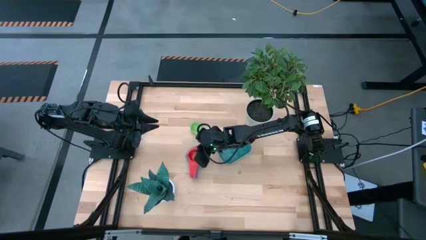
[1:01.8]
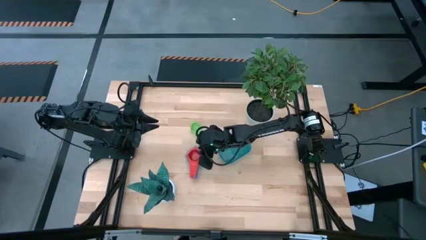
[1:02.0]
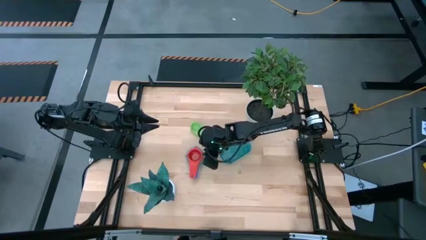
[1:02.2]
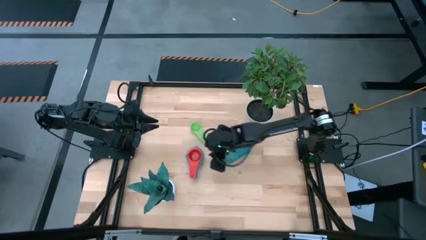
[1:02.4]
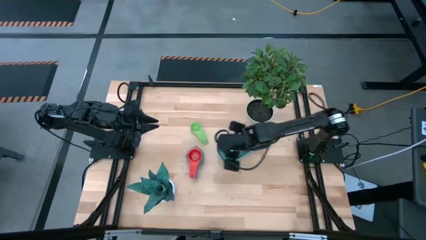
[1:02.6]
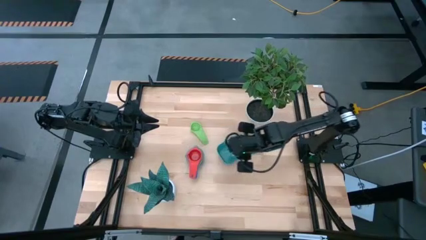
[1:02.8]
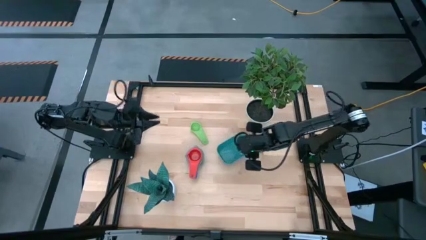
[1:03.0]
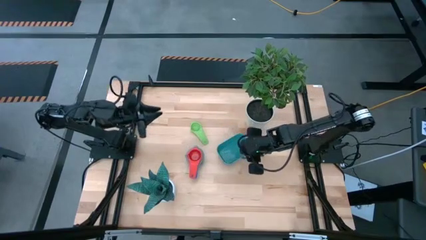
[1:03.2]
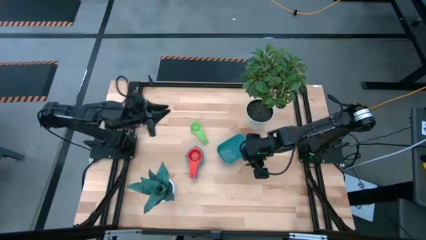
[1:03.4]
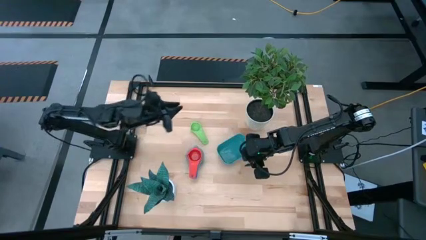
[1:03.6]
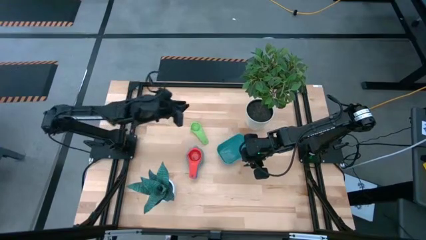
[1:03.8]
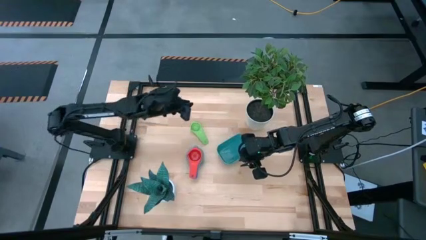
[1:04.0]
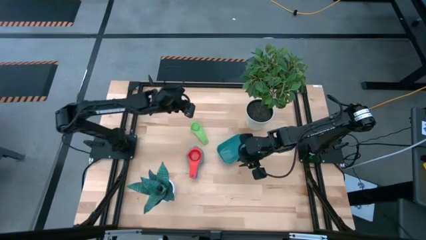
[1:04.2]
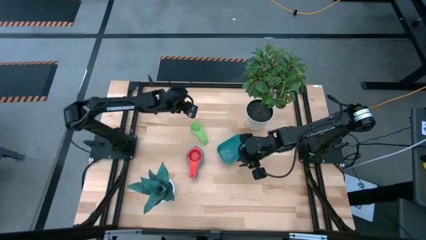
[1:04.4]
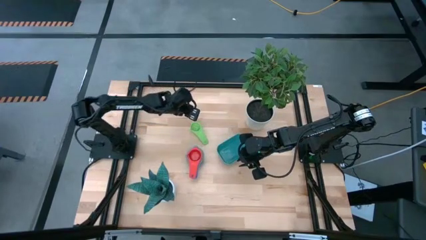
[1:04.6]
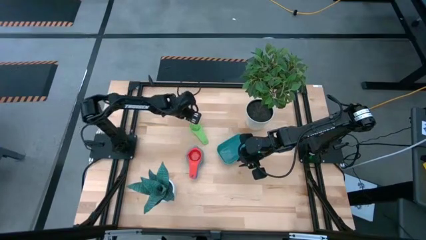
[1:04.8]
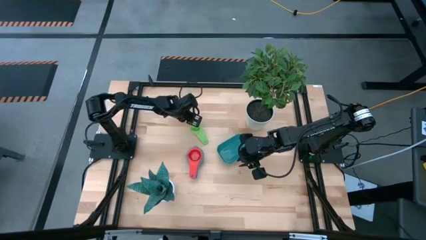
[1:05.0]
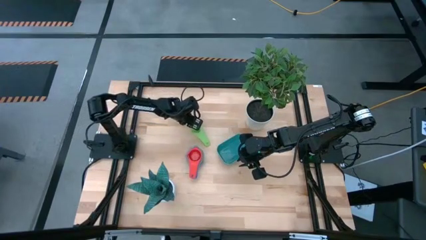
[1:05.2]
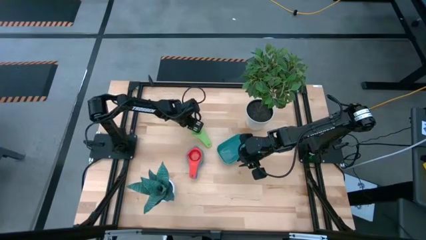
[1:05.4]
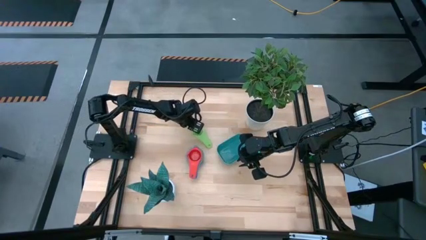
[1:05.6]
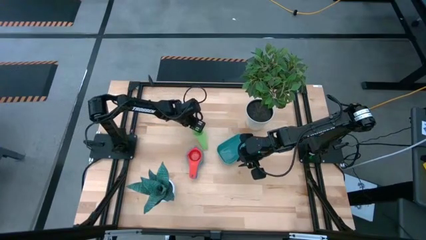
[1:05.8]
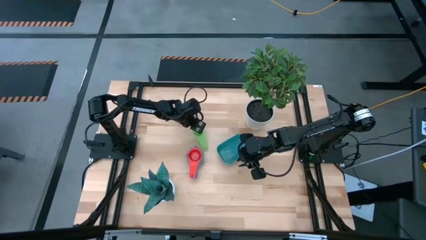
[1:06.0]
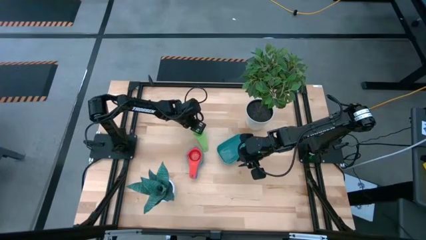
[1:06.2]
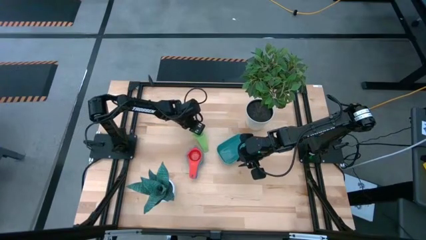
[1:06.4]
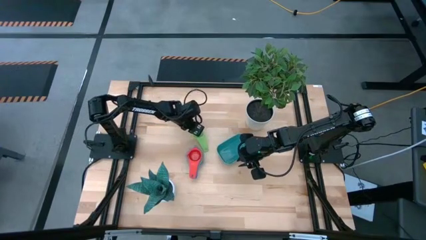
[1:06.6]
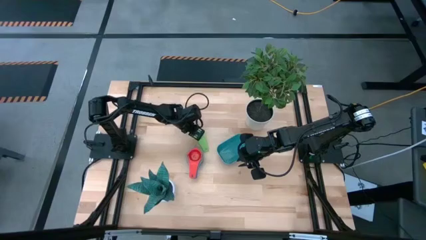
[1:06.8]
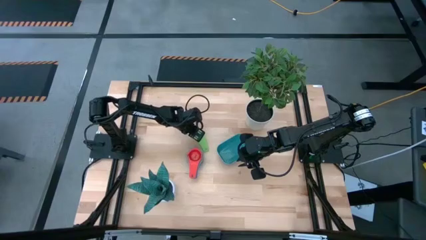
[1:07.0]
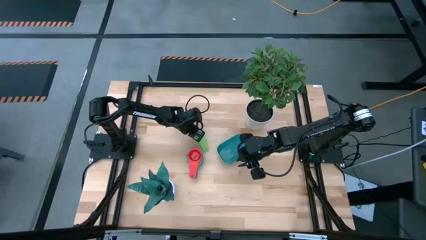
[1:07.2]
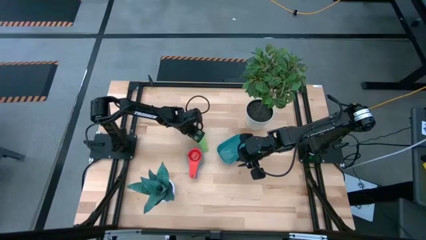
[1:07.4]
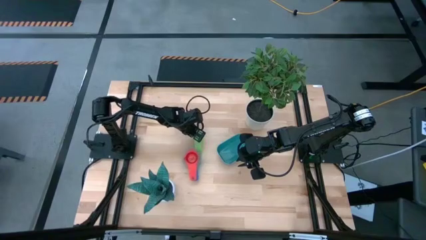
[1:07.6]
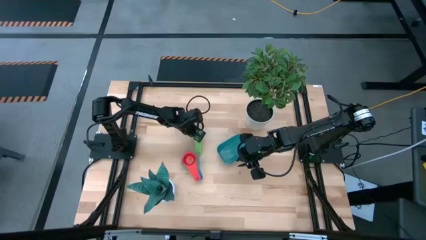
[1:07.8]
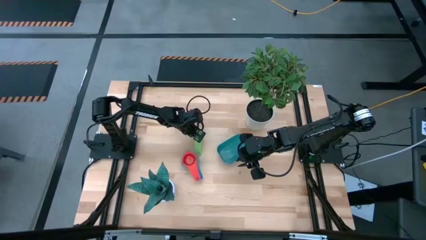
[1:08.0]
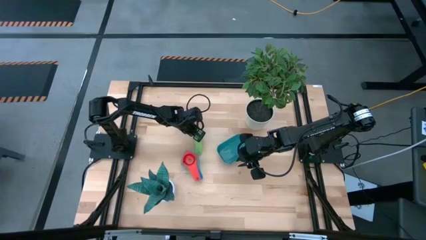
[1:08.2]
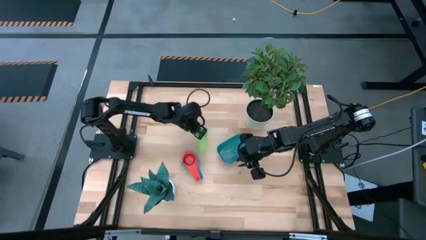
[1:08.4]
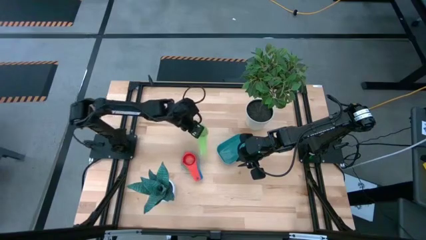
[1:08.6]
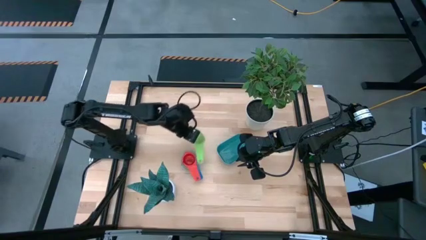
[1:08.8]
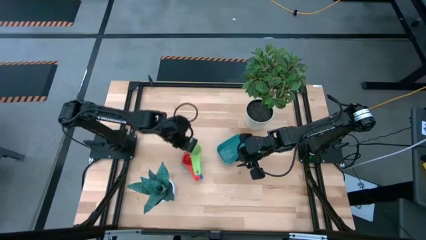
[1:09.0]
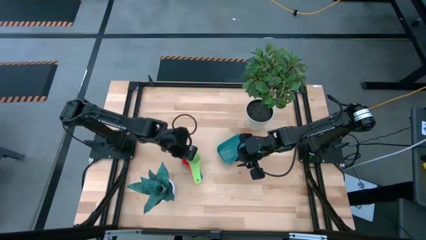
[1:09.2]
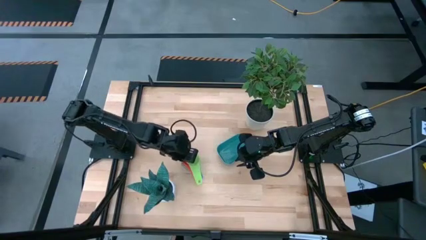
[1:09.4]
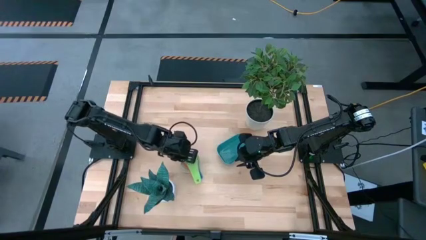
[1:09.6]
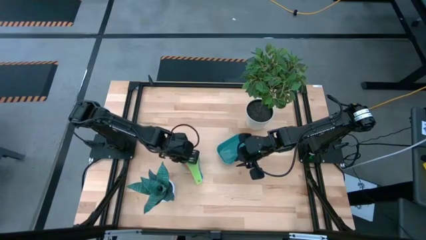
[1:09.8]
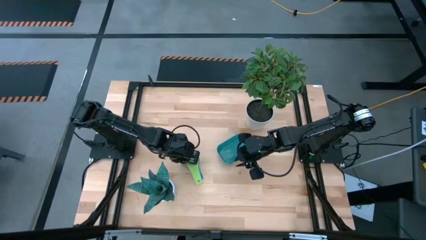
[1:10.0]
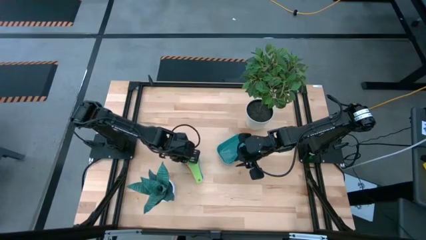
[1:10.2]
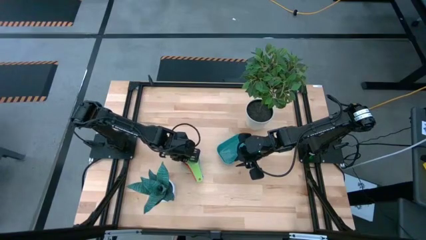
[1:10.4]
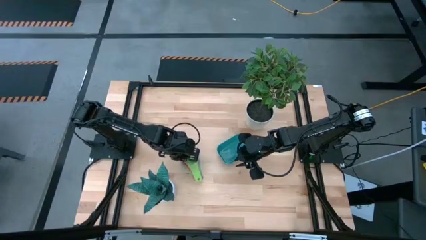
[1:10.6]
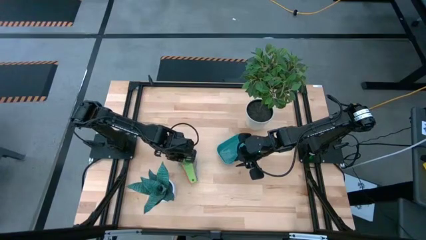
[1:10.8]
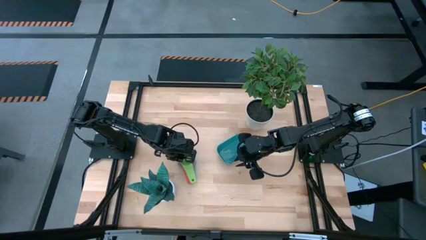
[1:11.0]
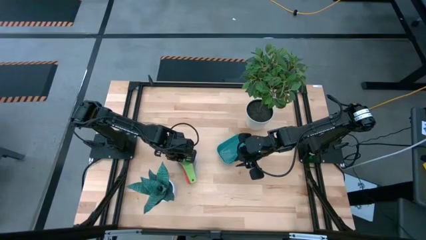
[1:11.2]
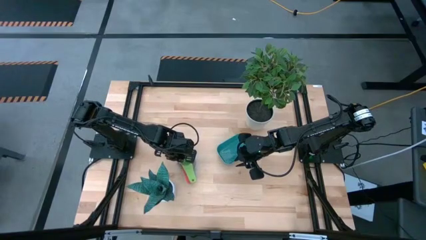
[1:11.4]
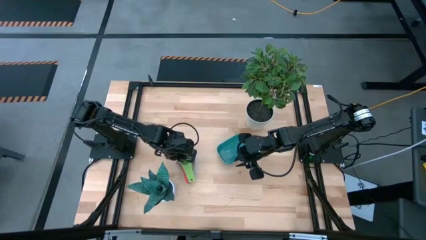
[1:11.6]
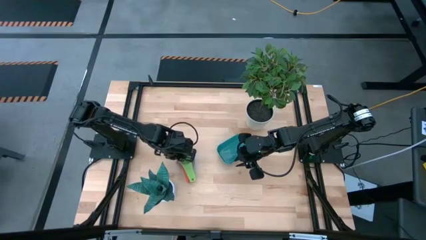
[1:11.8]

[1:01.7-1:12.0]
Task: Nest measuring cups in basket
Stack the green measuring cup on top of the red measuring cup
